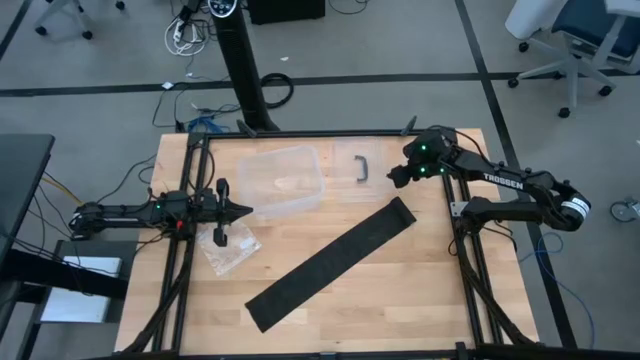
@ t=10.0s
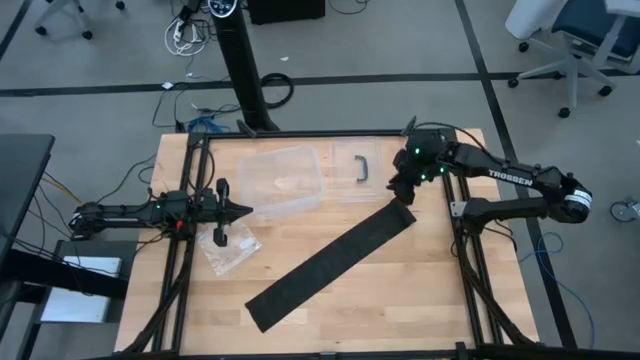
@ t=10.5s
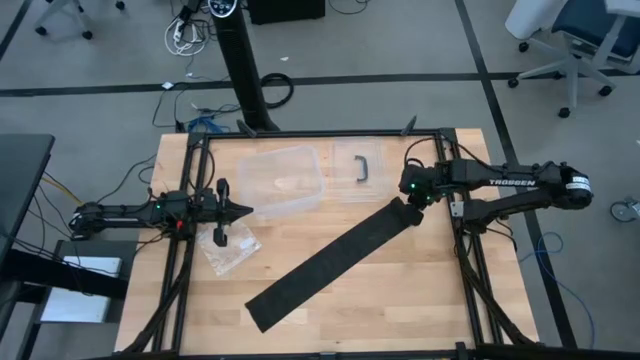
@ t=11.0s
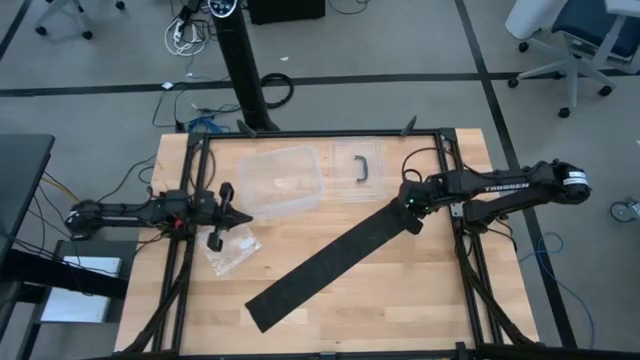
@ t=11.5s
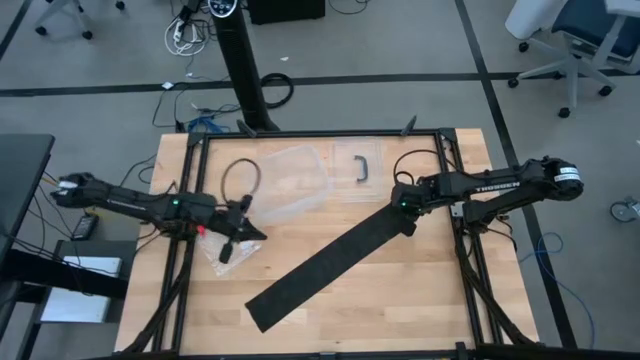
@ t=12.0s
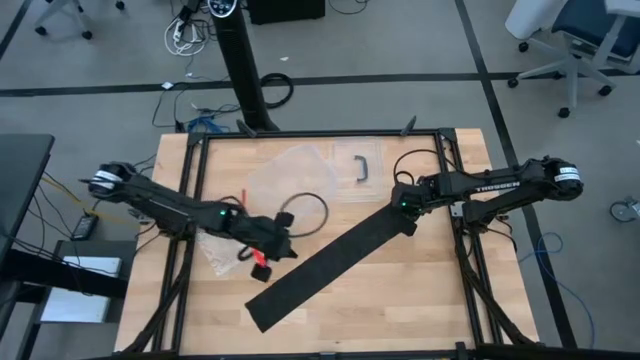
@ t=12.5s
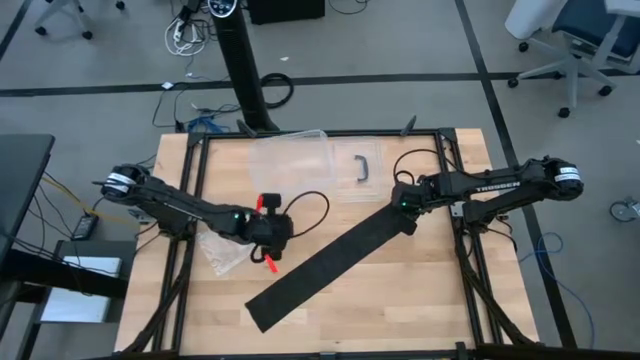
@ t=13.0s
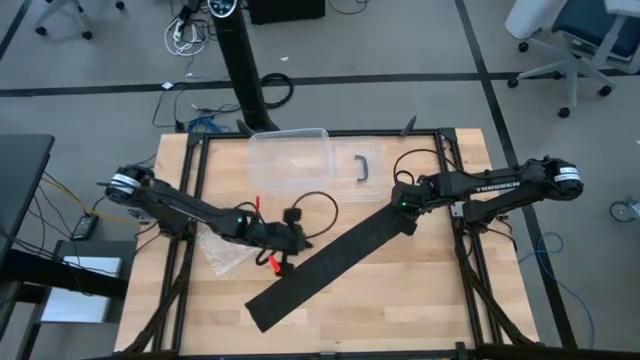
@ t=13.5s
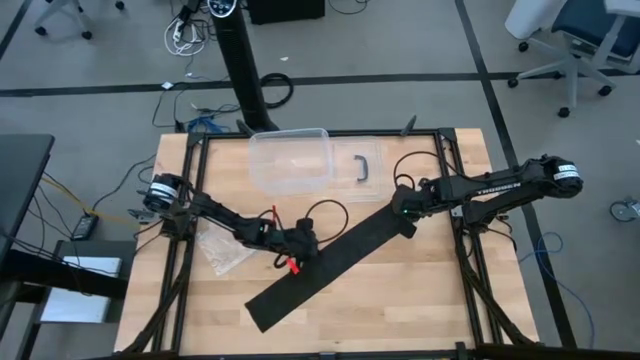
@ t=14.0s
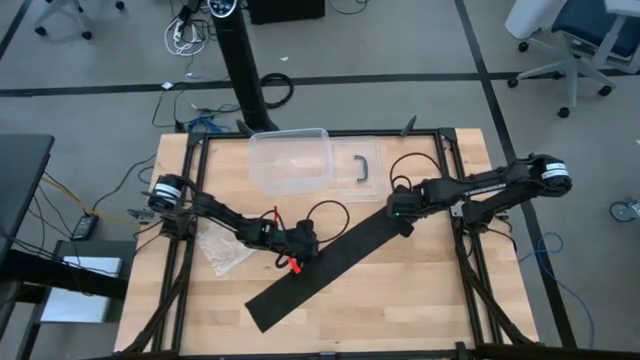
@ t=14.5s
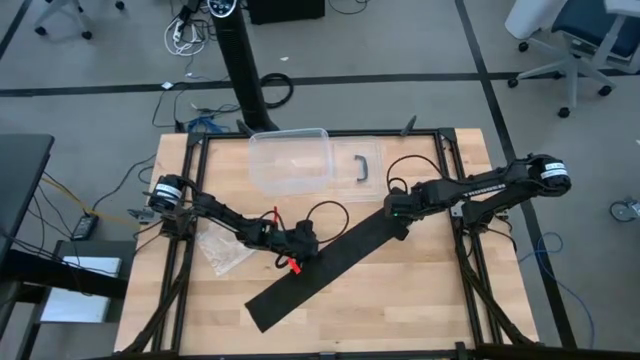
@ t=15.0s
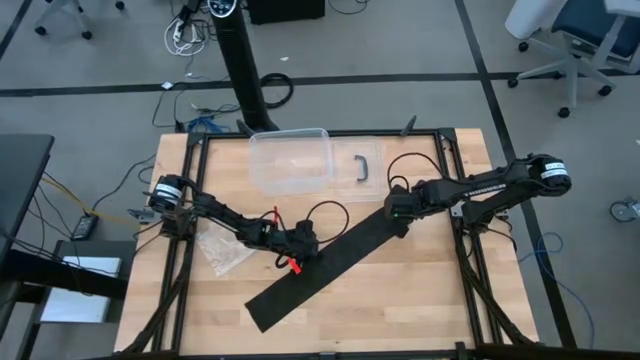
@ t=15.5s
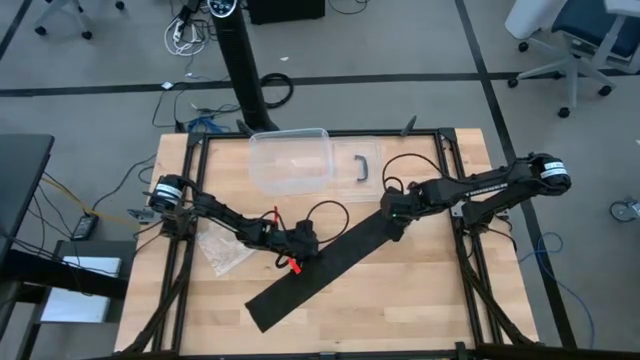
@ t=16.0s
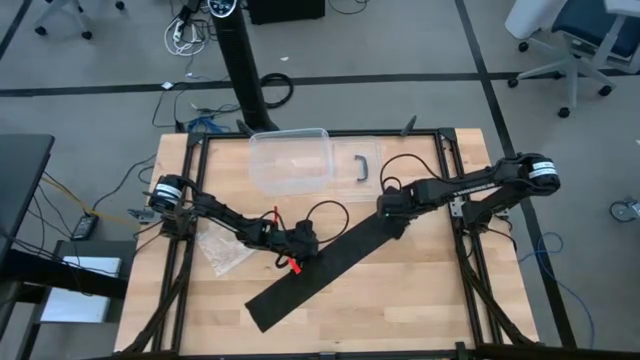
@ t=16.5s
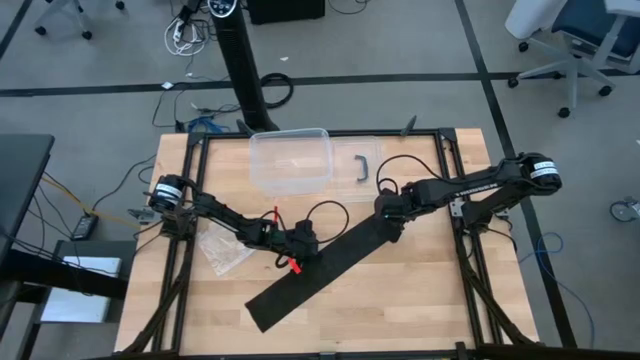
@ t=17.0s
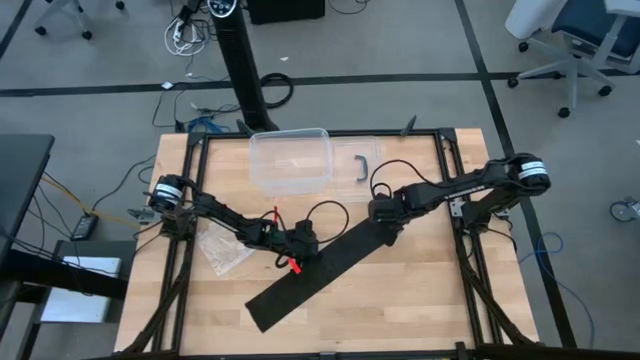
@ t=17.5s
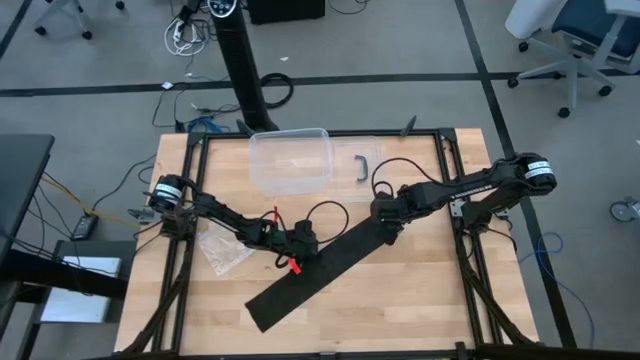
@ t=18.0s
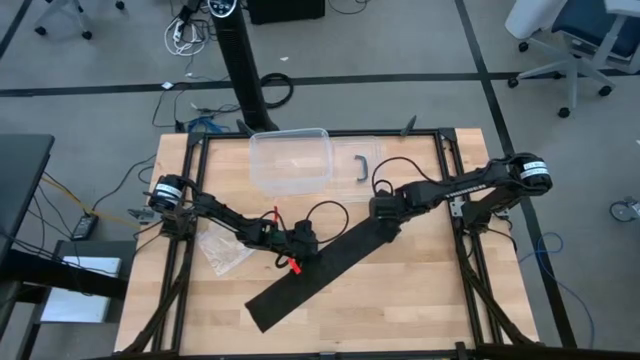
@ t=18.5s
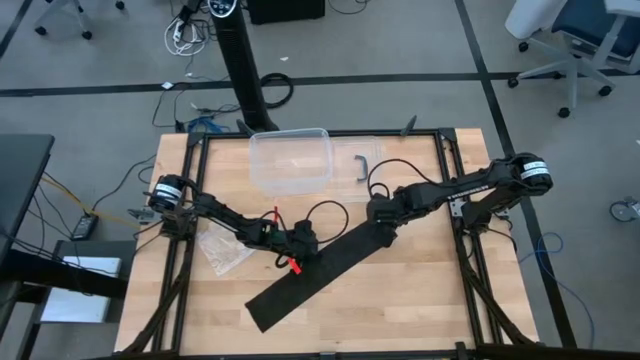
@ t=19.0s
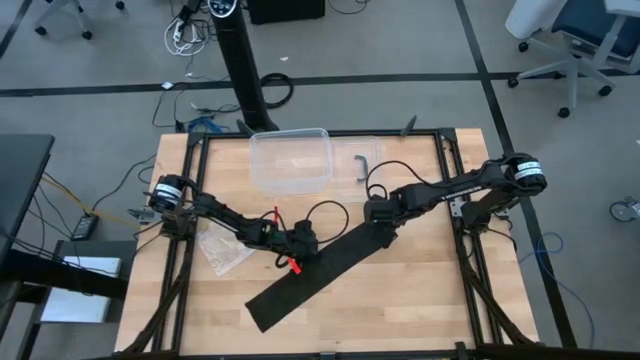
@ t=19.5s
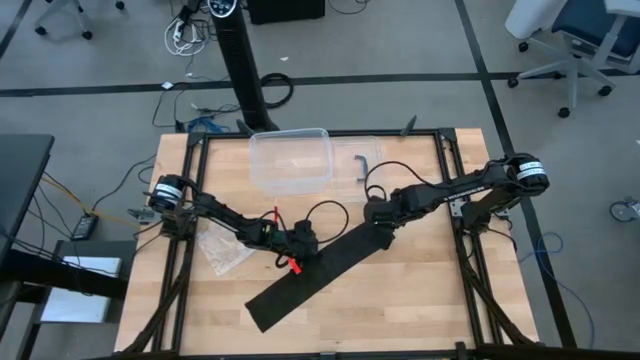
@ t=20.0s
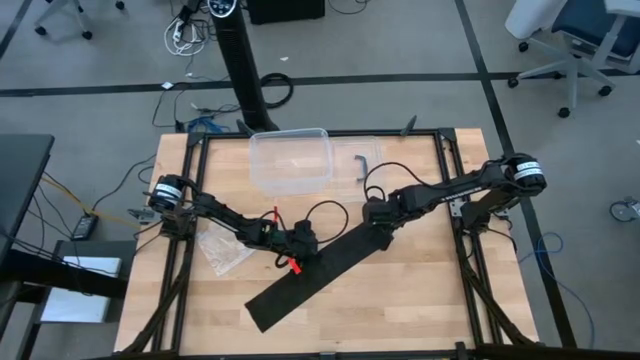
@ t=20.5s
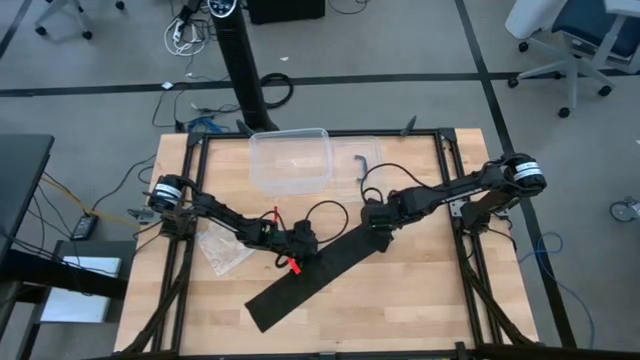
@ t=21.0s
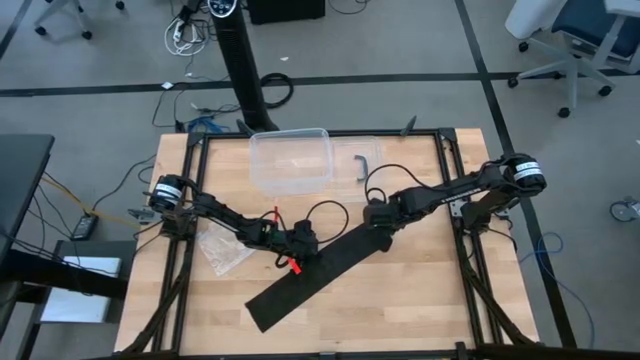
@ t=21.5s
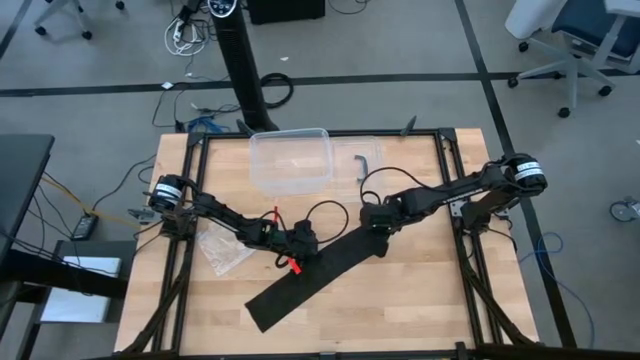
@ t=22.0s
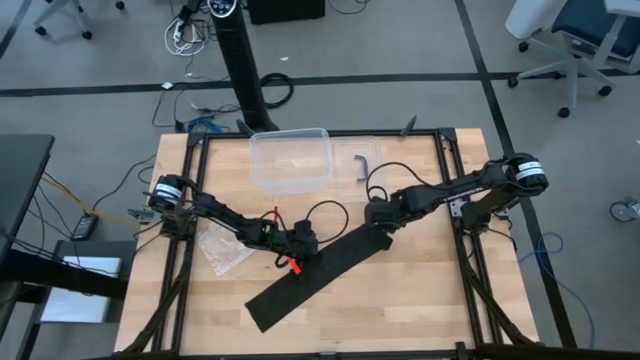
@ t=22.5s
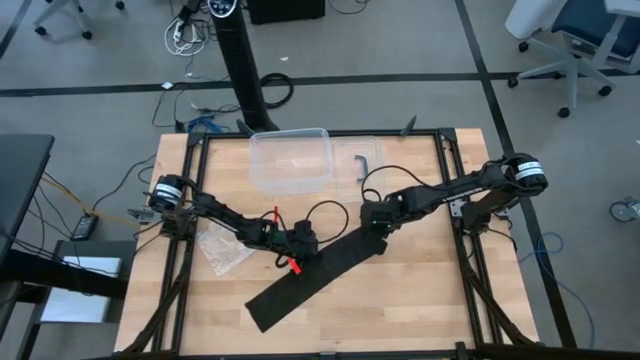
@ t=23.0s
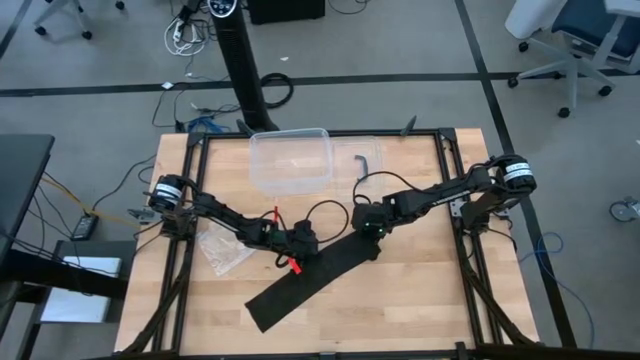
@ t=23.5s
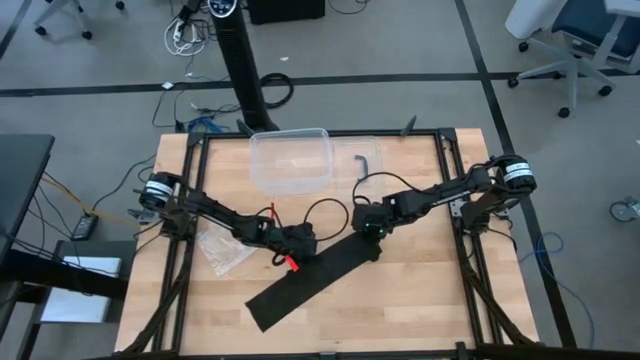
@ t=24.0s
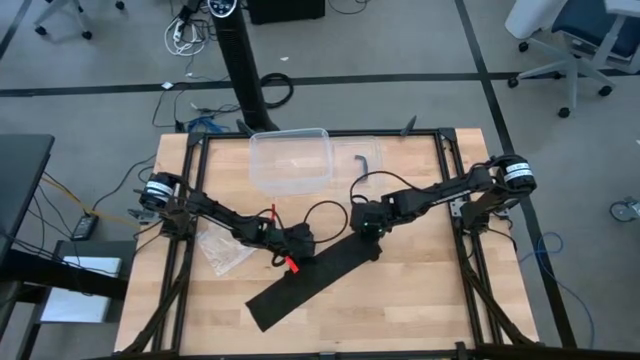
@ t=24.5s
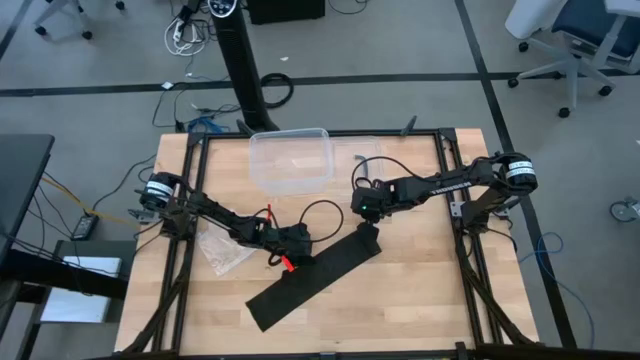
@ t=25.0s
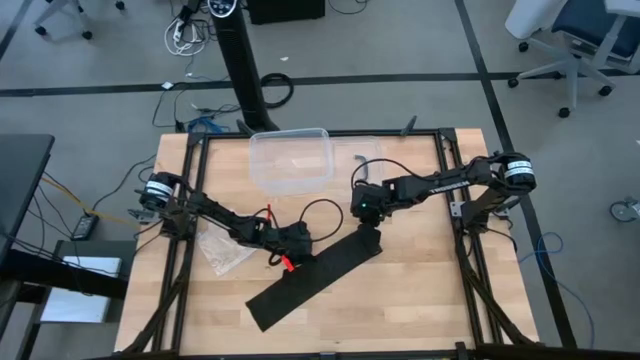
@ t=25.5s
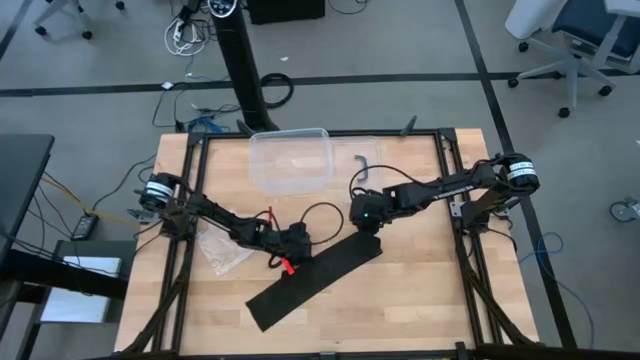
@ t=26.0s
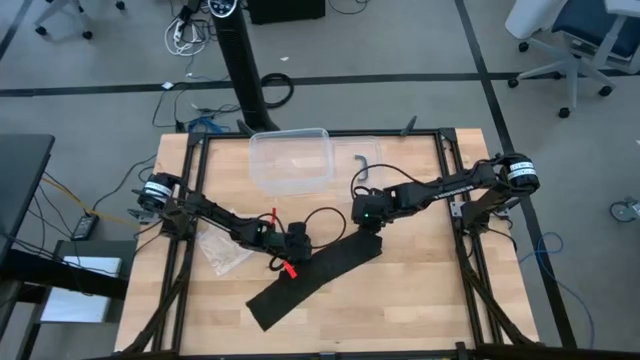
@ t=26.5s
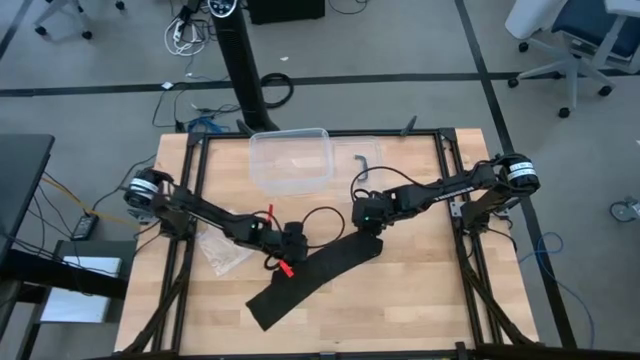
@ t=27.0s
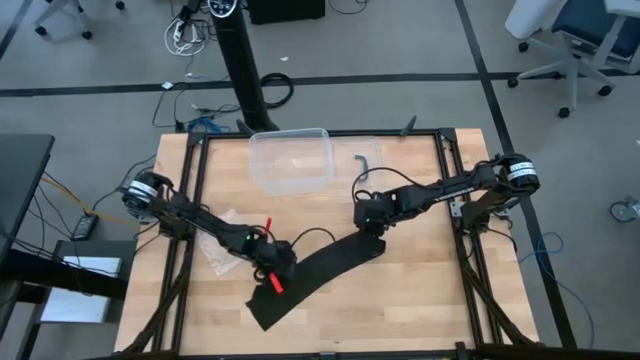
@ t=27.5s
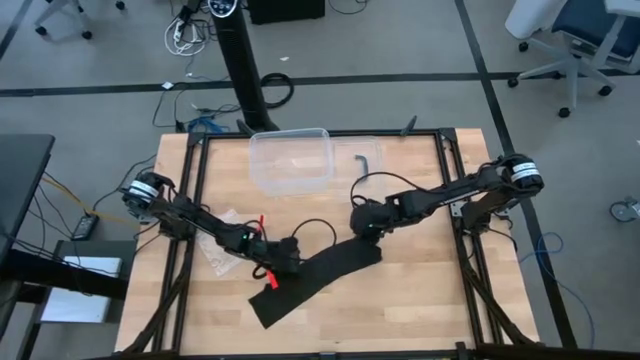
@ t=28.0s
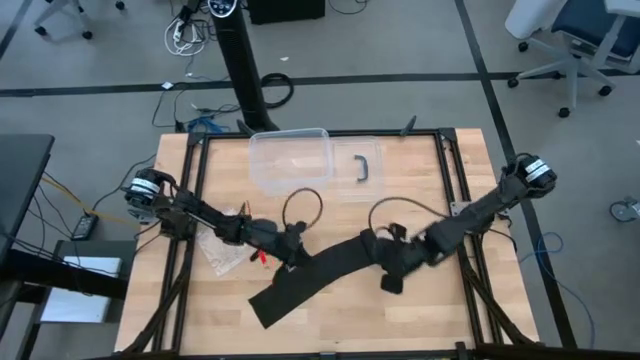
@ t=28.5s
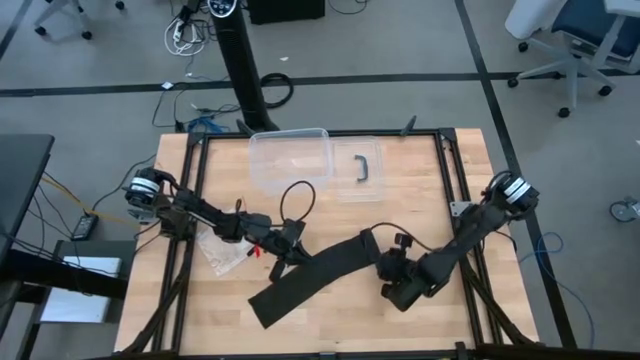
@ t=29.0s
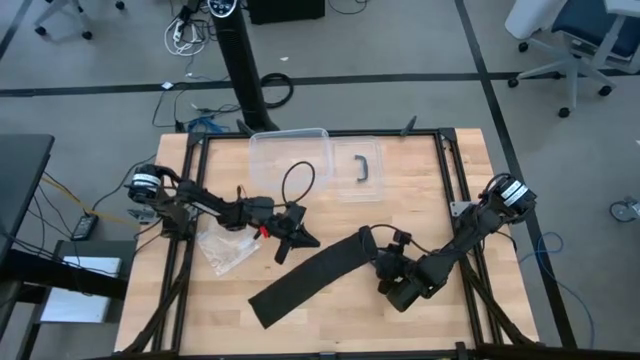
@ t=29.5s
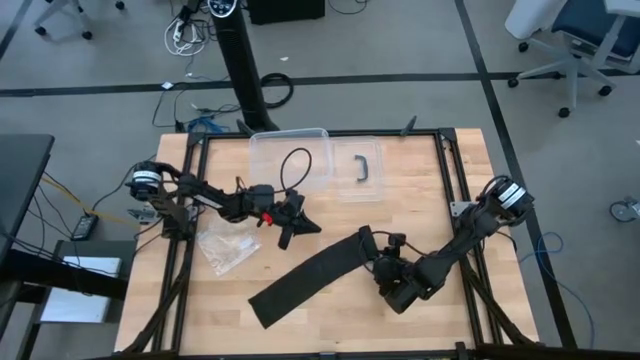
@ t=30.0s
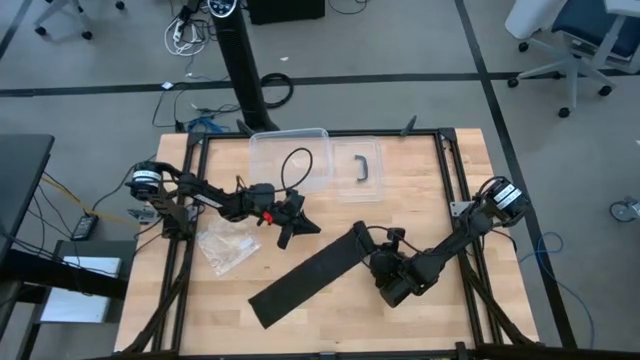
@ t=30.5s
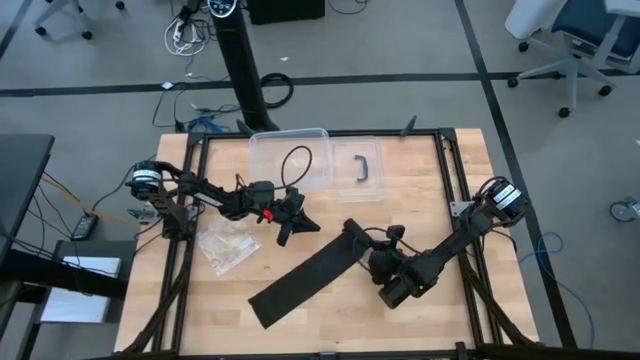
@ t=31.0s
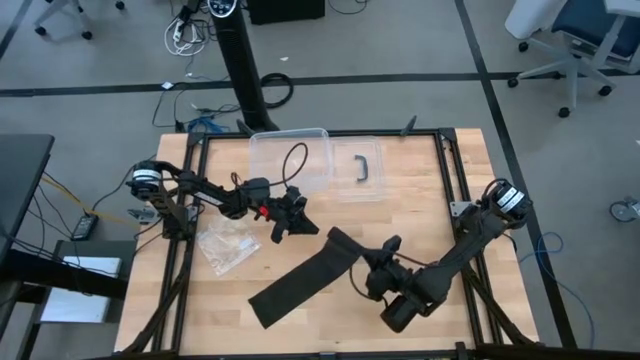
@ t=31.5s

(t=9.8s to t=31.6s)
Task: Roll bandage
Roll the black bandage
